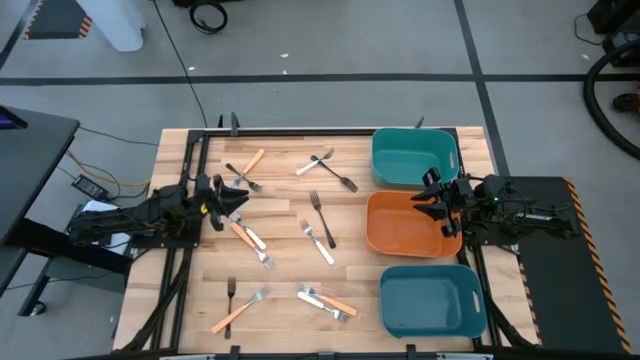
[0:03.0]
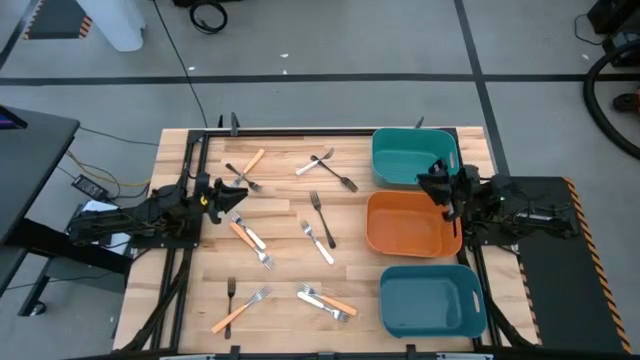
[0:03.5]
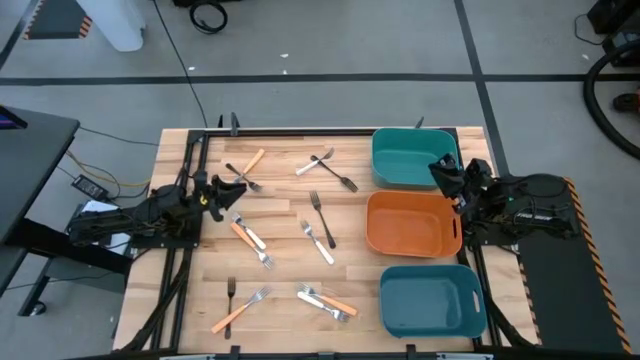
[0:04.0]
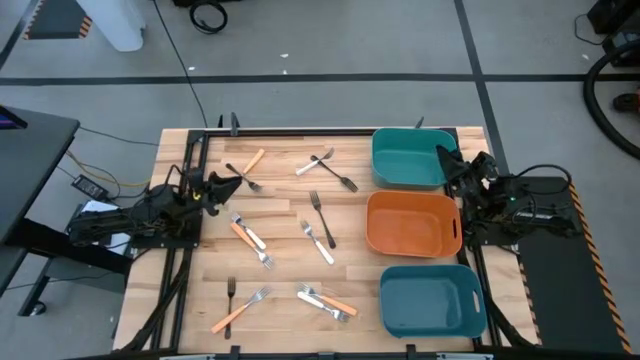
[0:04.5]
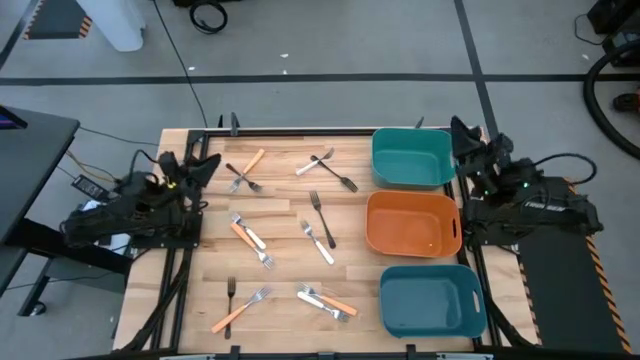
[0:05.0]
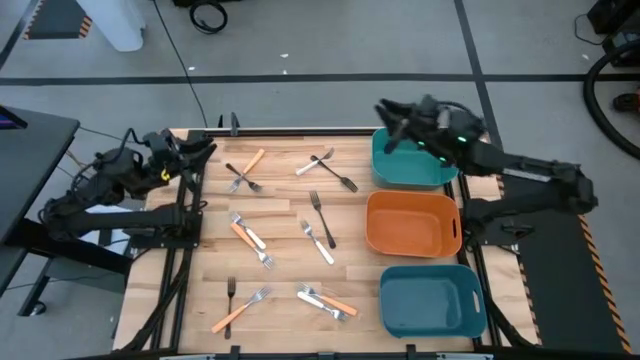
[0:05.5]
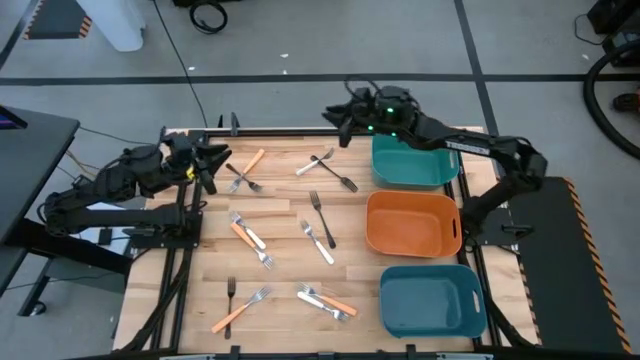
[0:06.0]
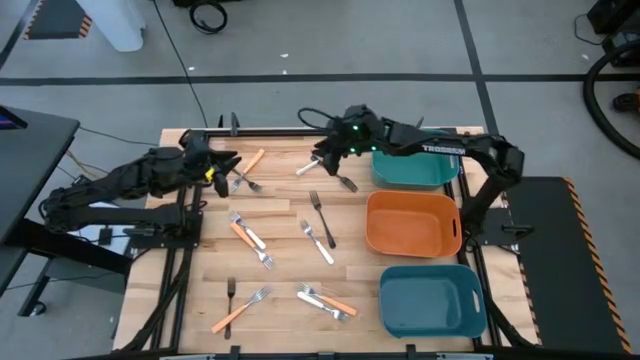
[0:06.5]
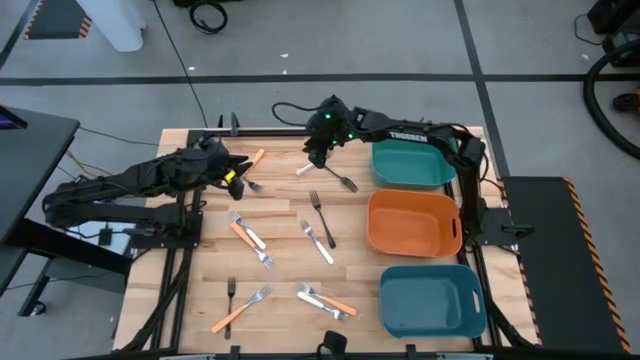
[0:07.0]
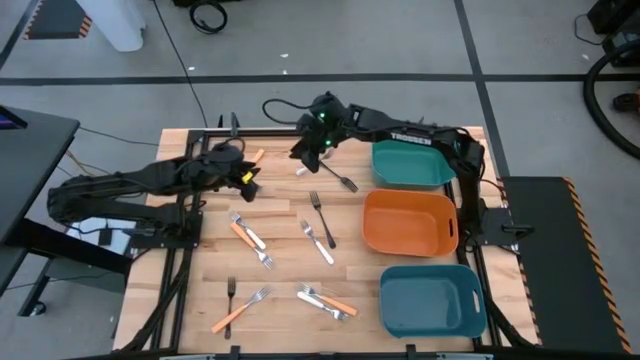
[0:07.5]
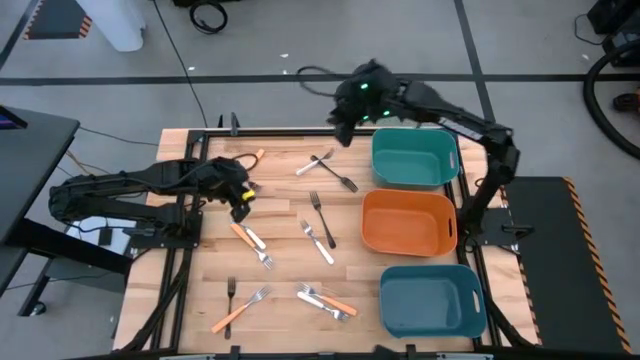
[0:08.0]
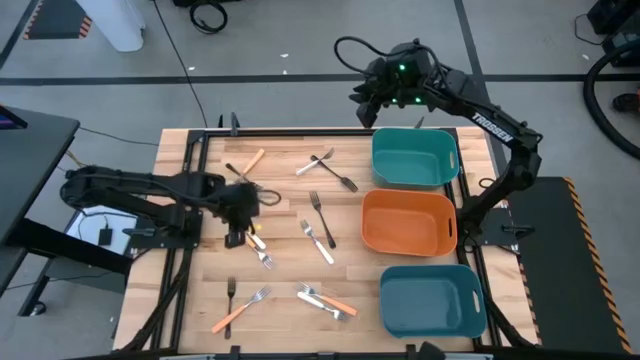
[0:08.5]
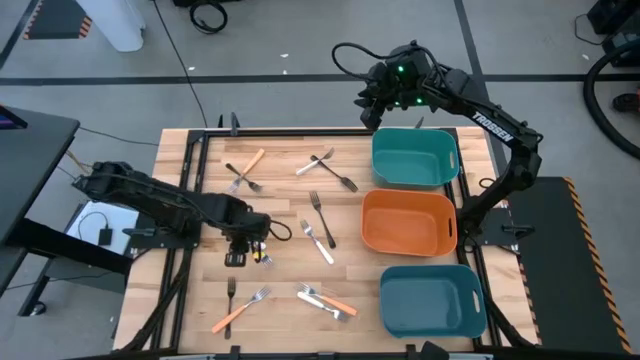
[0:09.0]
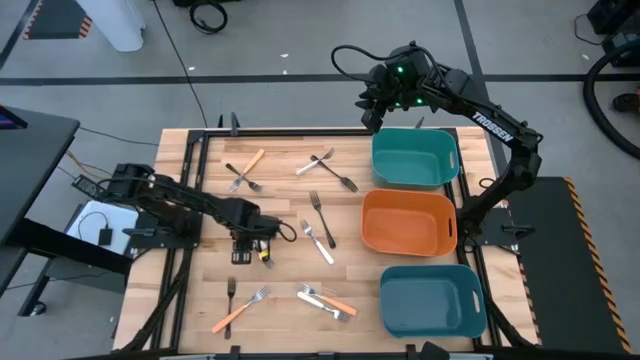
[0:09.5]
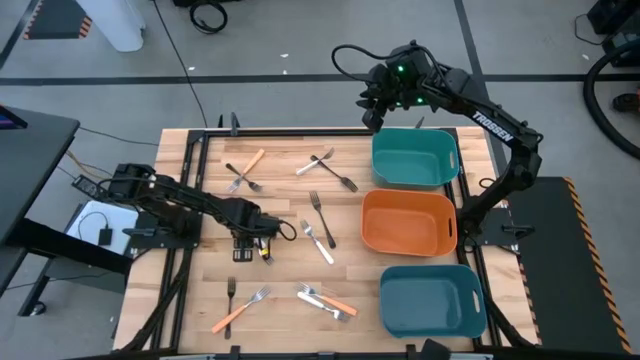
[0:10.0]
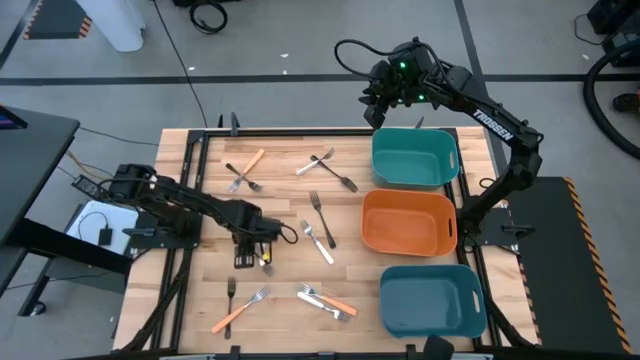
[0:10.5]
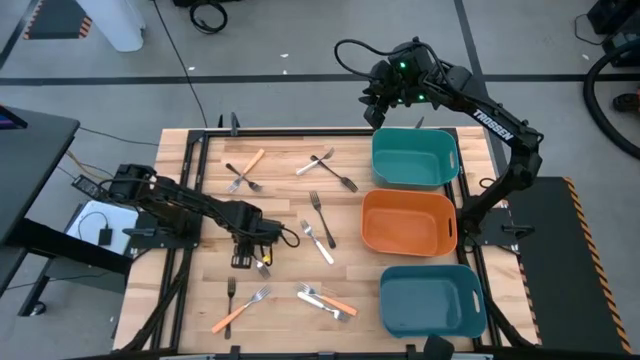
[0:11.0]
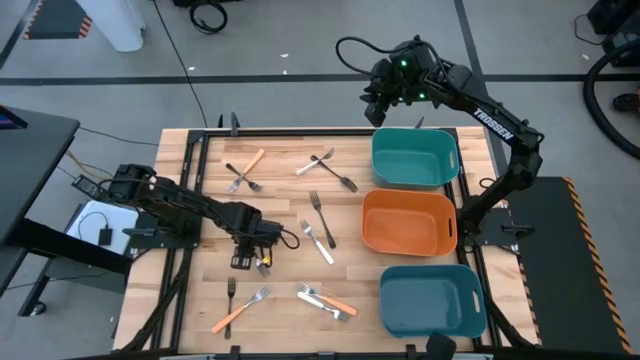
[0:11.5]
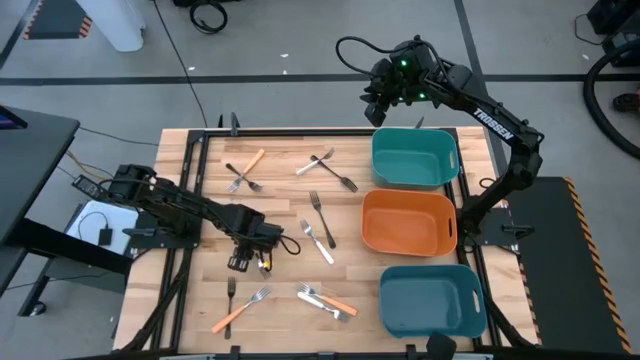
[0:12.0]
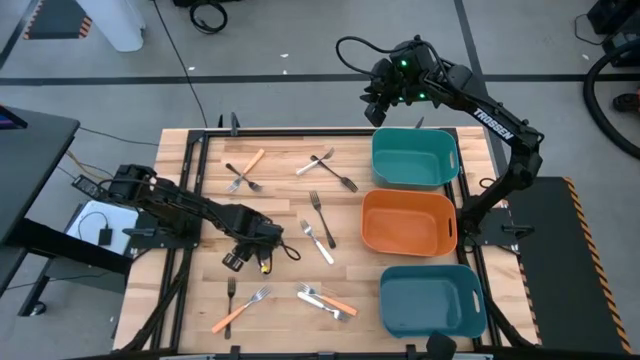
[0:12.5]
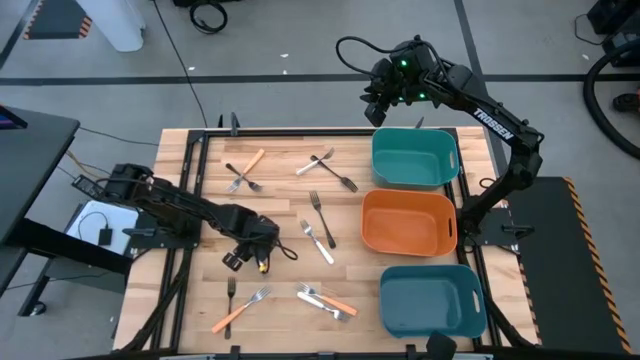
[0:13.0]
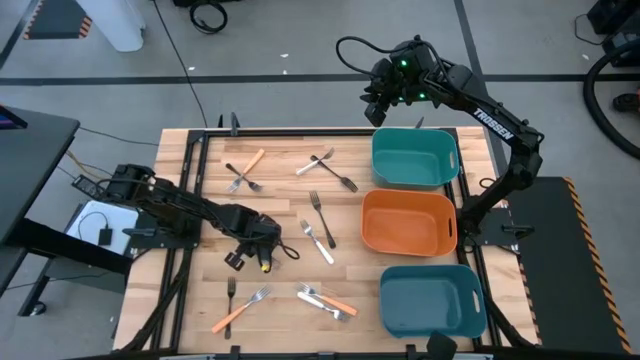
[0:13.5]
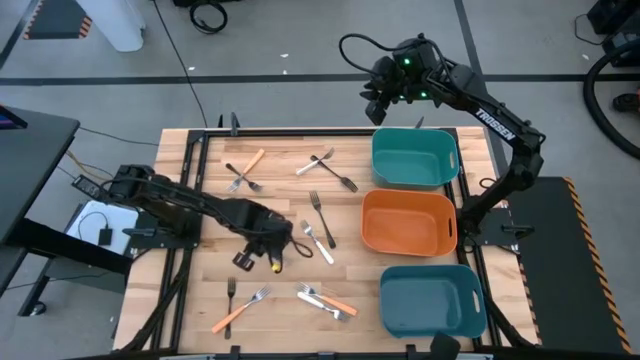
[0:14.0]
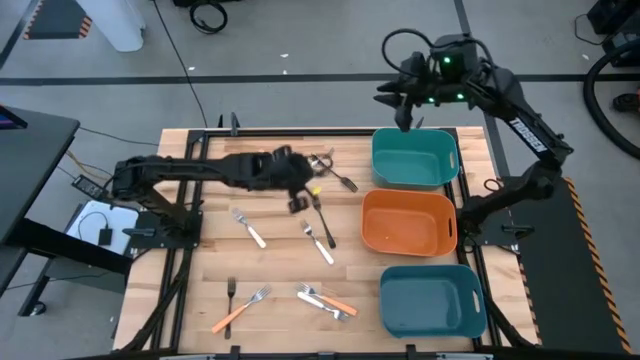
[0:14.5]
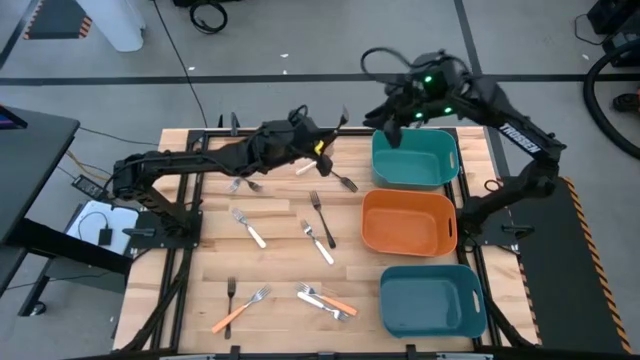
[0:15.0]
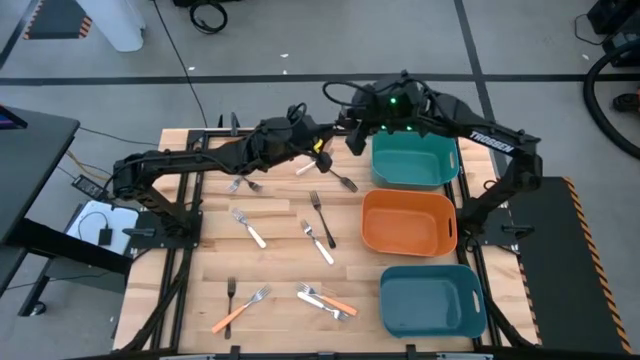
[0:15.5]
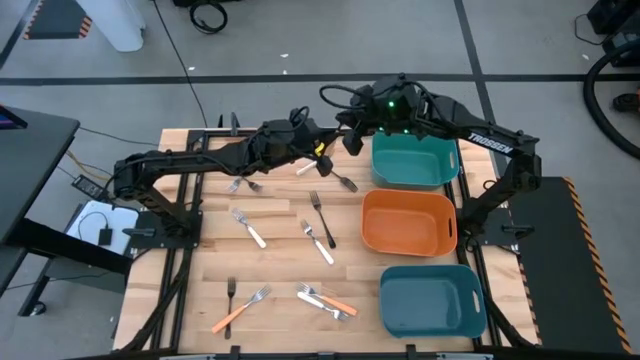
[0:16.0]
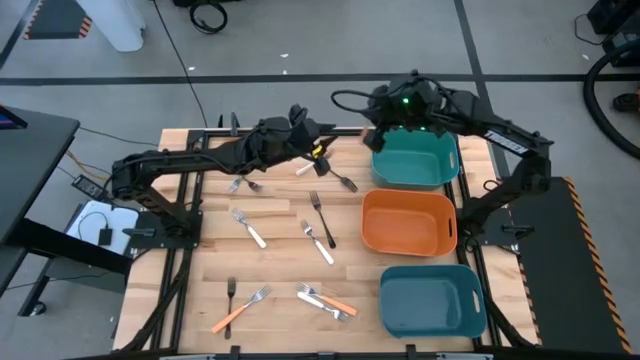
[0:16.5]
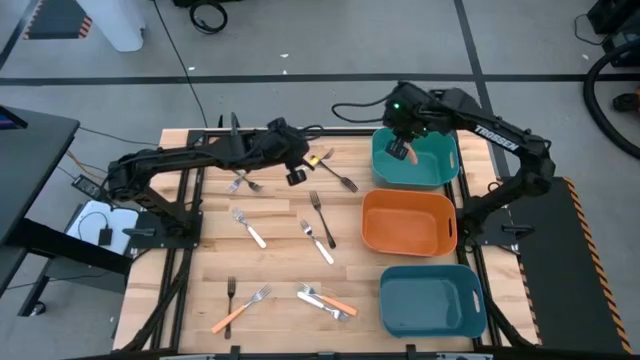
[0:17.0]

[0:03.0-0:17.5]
Task: Sort silverware by color (type)
Put the orange fork into the green bin

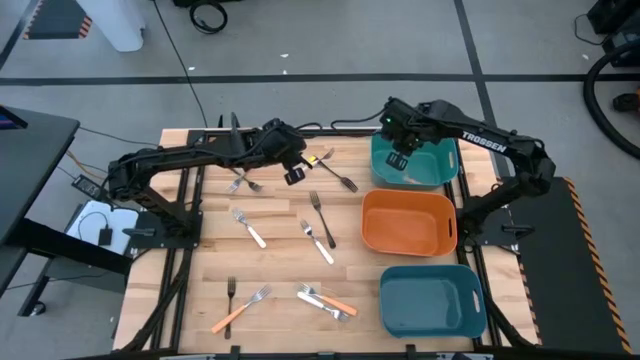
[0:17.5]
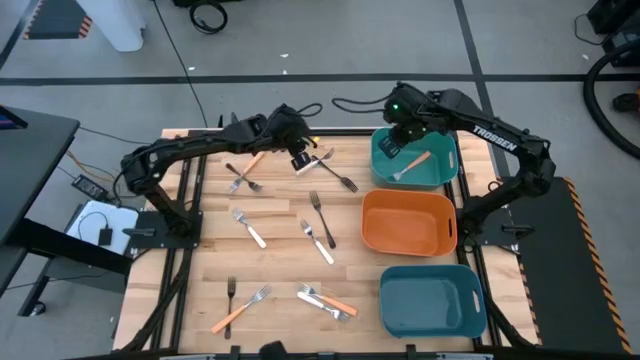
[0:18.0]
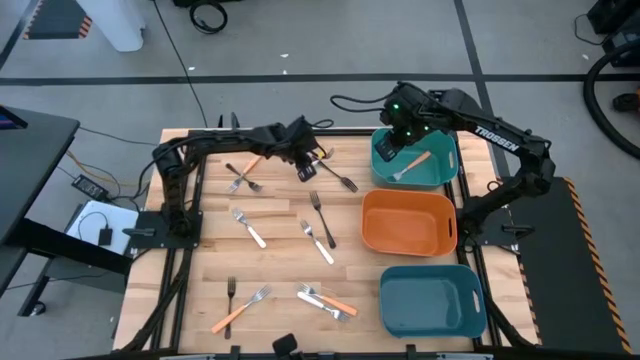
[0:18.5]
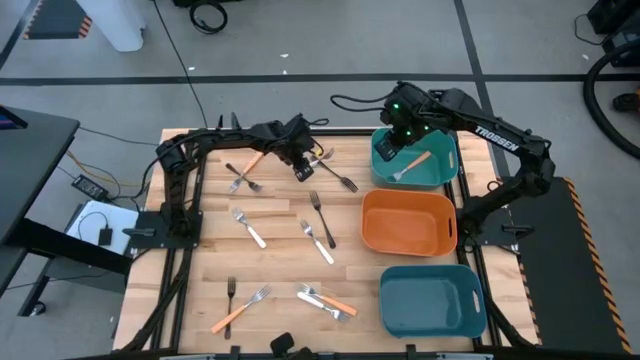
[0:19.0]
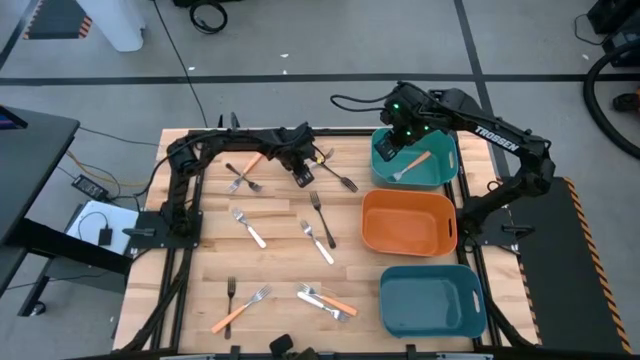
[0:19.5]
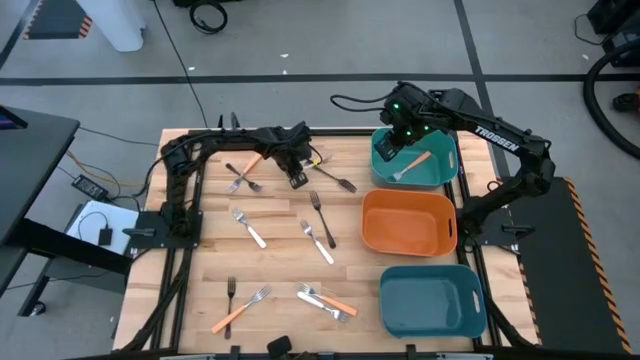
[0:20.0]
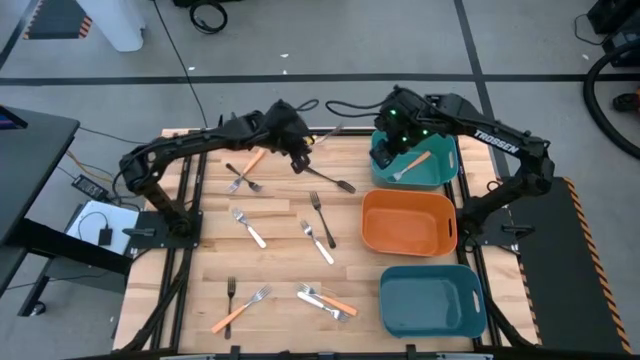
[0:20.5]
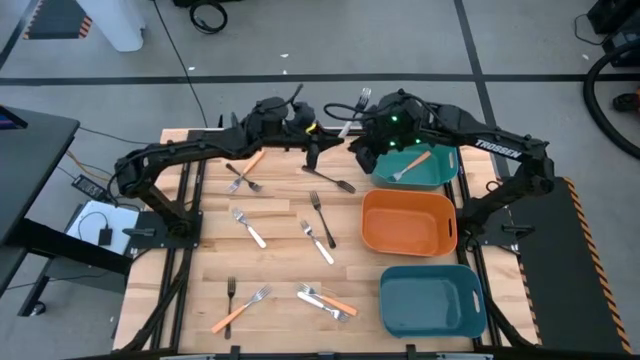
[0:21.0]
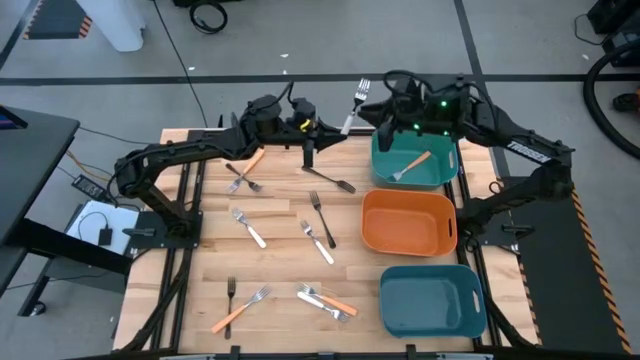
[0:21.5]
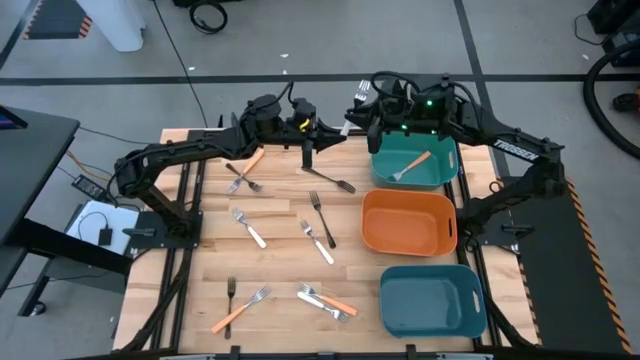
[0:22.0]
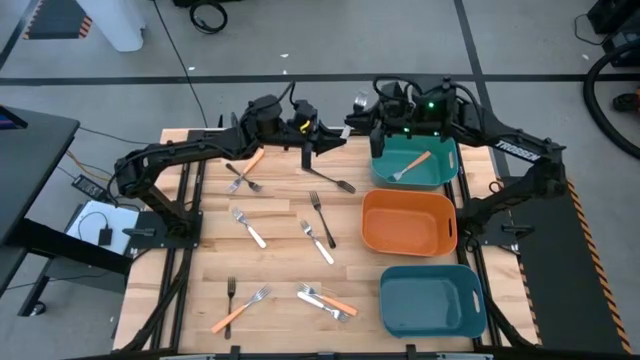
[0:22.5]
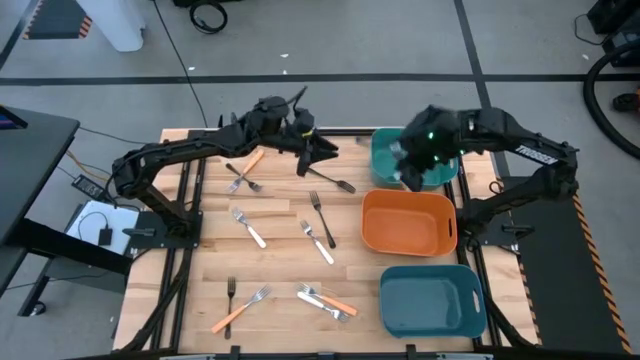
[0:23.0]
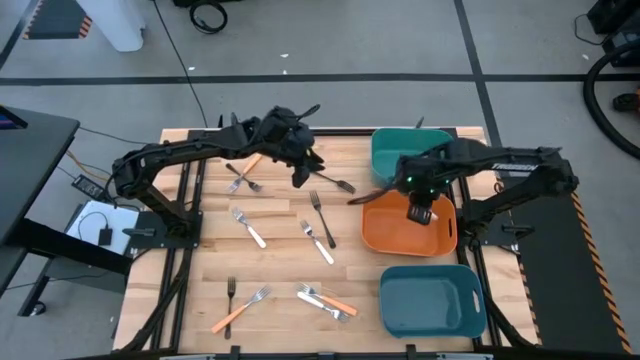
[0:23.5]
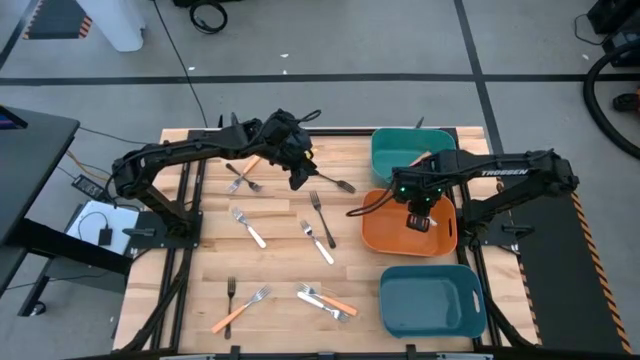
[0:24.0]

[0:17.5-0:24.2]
Put the white fork into the orange bin
